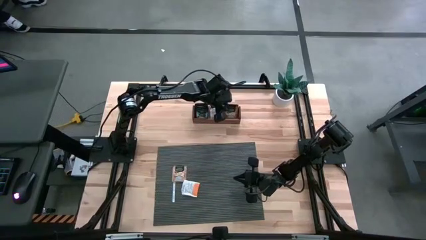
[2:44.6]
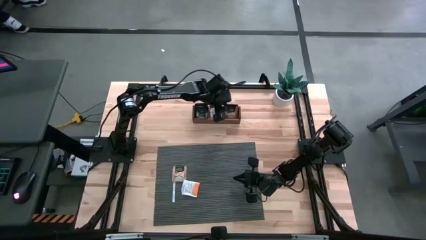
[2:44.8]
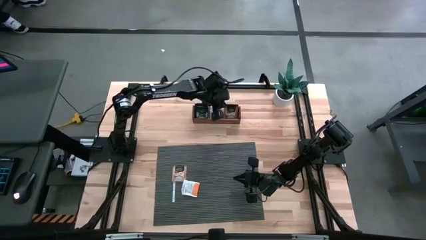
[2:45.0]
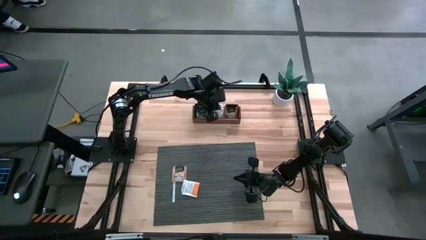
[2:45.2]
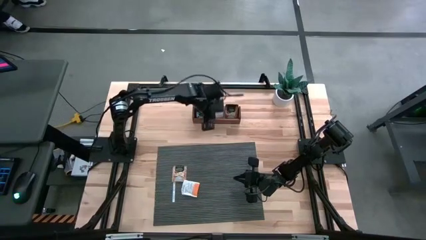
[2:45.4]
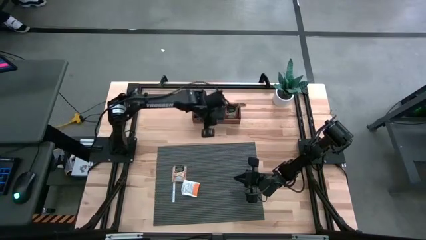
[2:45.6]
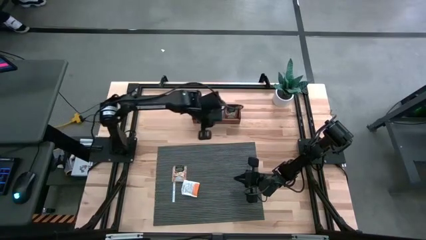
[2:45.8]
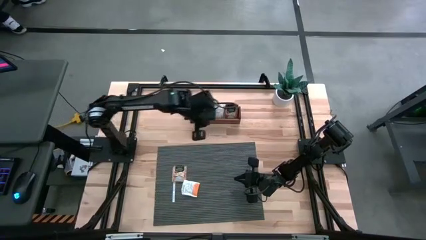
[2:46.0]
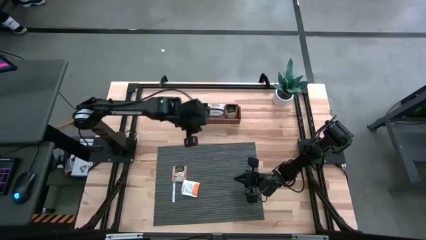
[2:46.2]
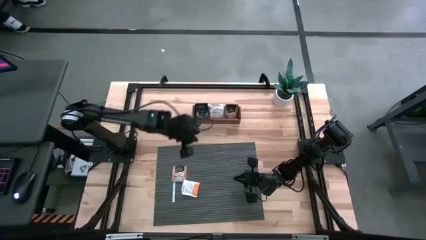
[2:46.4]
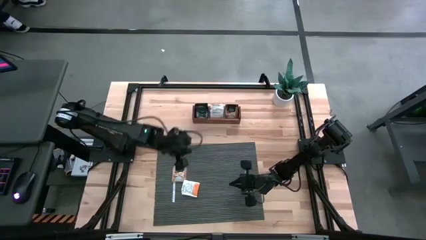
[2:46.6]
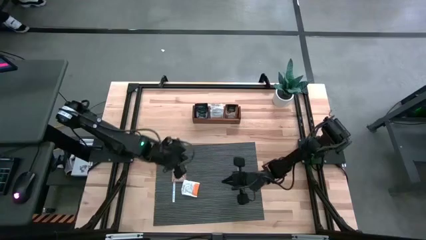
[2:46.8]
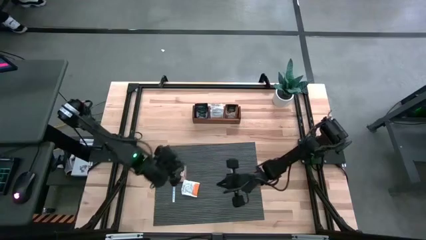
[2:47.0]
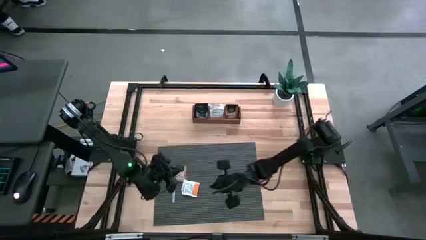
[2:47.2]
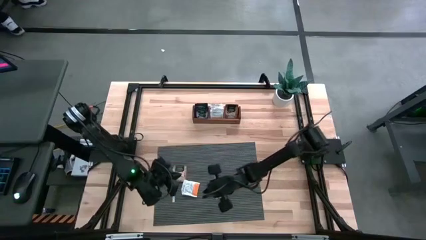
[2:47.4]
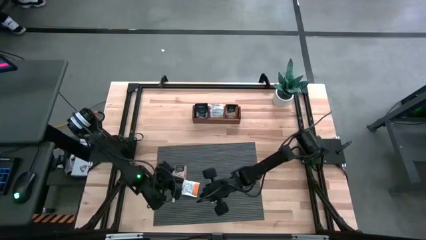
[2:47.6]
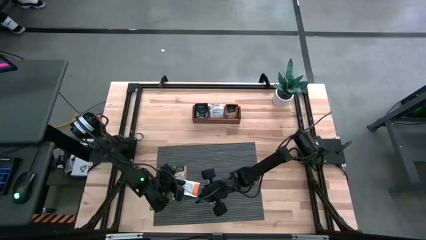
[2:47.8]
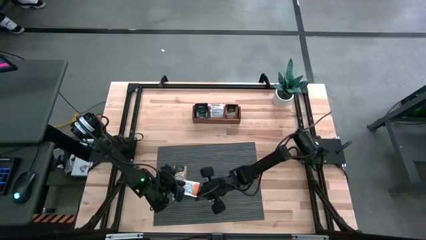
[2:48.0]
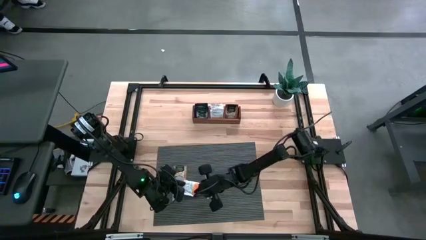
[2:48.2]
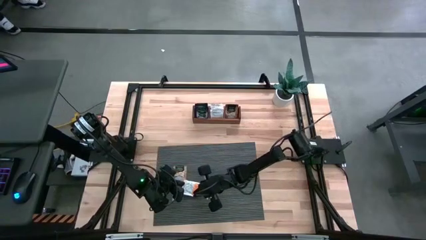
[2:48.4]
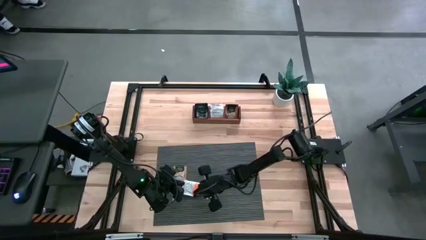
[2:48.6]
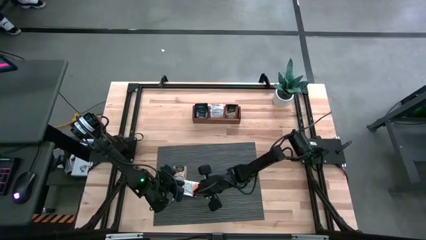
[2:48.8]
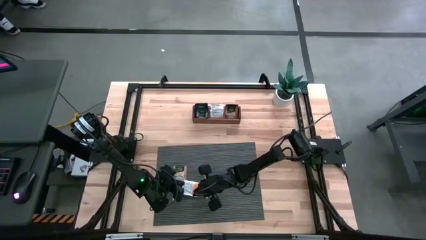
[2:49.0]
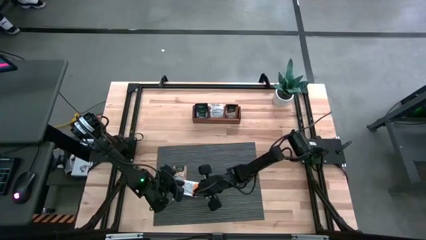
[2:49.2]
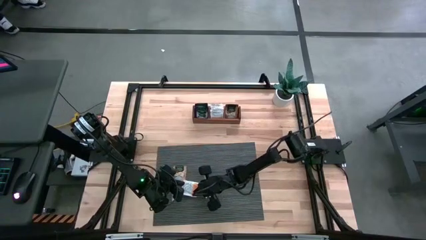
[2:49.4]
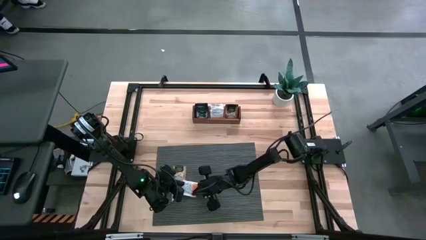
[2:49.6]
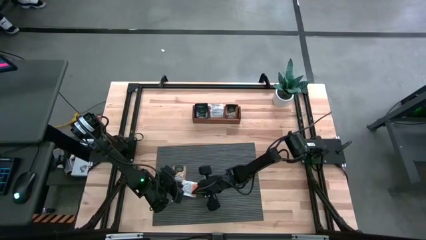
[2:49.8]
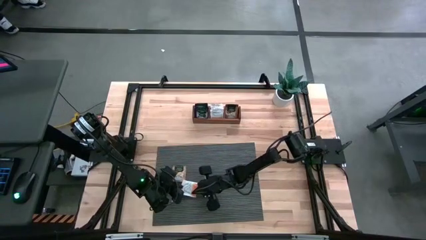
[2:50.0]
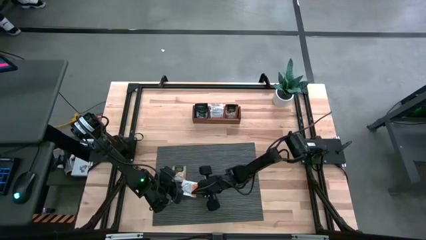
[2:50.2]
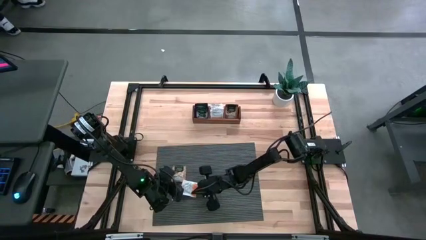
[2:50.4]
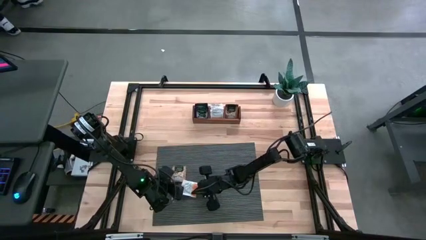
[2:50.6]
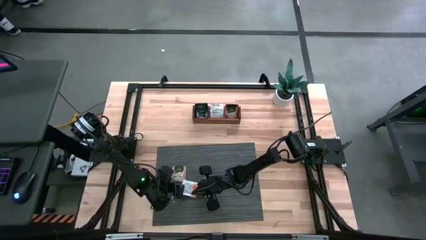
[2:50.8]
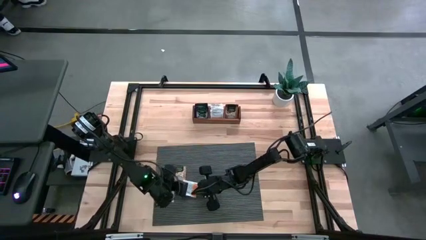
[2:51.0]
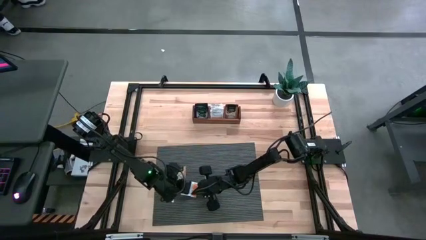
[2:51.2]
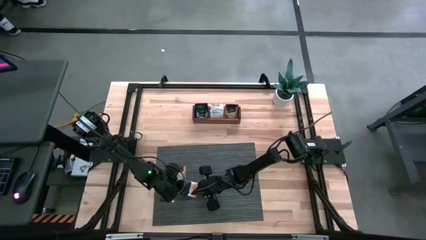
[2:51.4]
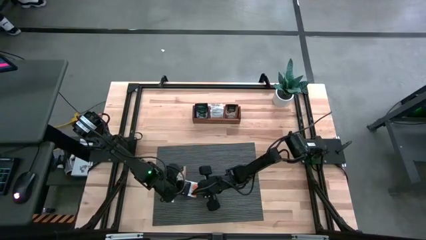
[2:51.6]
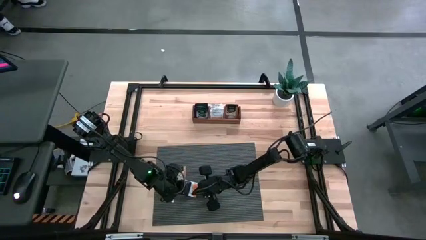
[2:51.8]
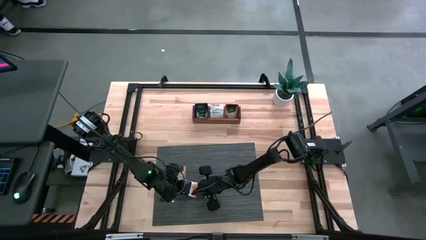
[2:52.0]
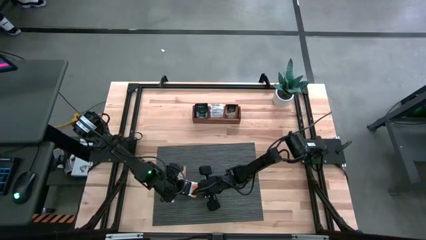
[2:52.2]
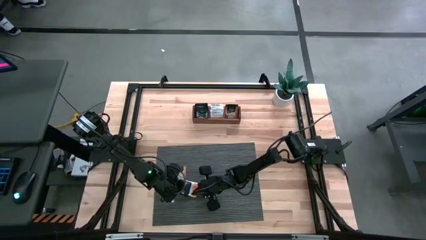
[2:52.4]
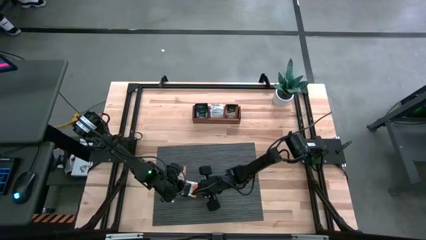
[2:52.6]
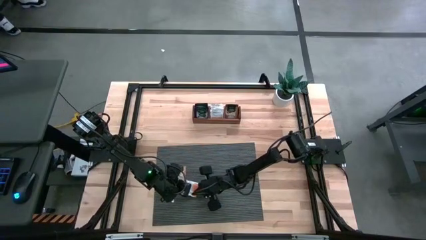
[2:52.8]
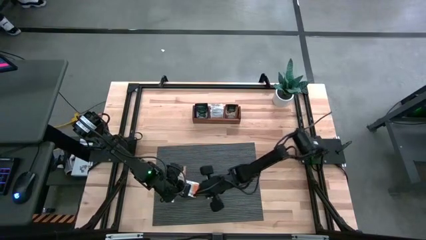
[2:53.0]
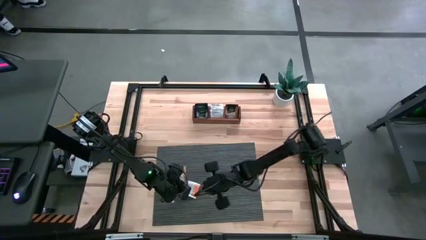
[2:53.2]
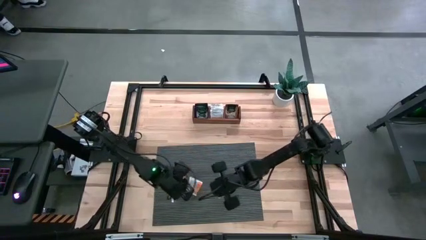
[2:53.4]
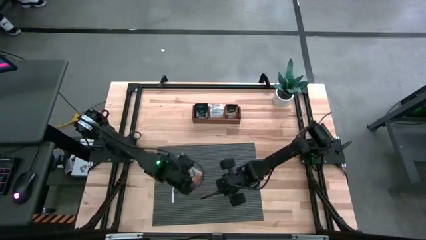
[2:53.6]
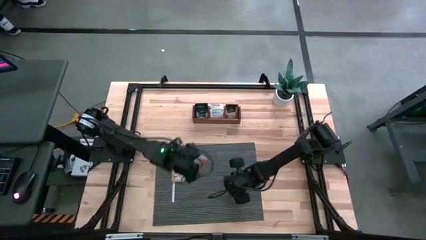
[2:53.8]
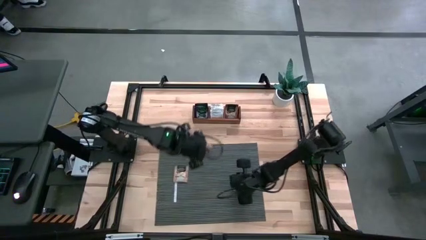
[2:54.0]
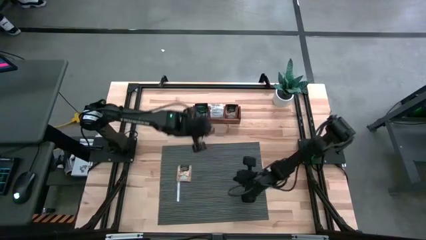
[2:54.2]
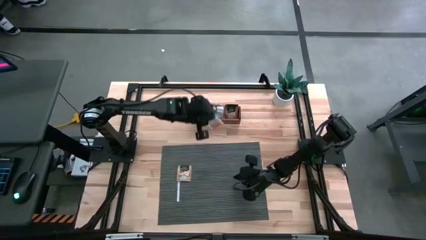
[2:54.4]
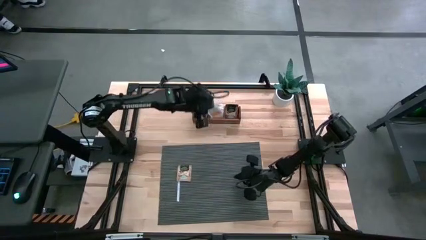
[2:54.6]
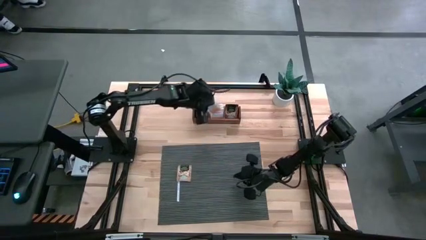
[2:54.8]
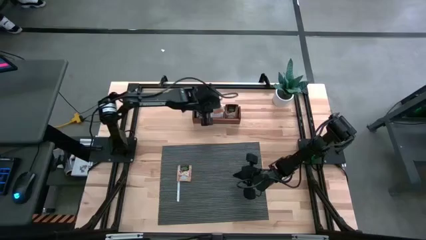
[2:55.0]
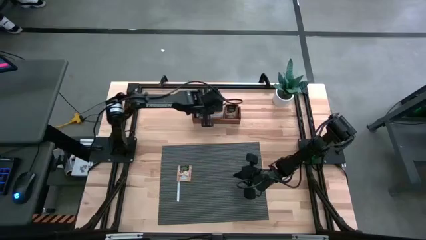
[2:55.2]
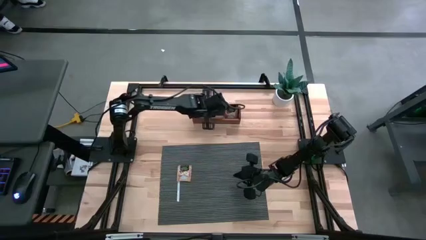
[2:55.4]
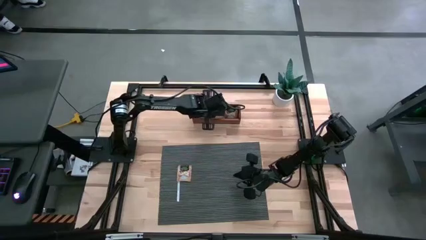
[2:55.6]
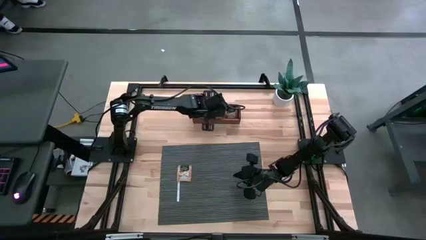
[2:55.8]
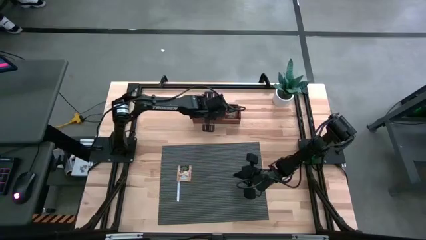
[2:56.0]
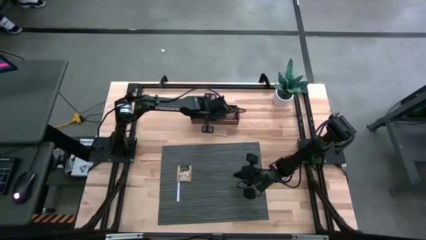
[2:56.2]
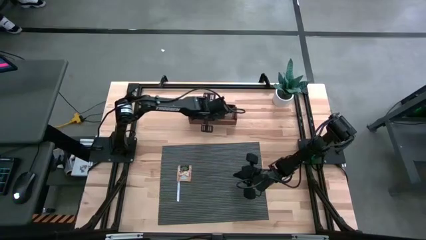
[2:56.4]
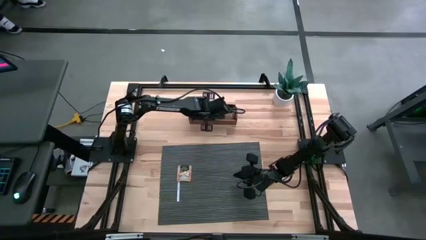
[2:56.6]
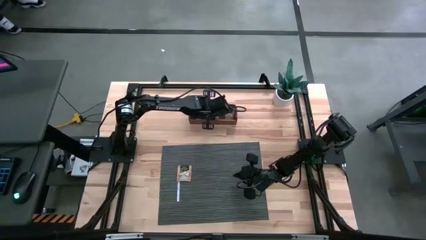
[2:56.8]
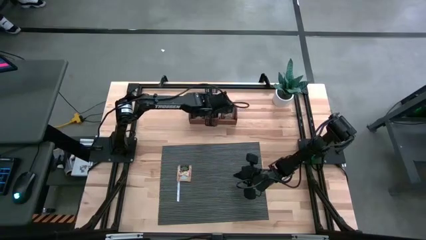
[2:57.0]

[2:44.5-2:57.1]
Task: Pick & Place Tea
Put the orange tea bag into the middle compartment of the wooden organizer

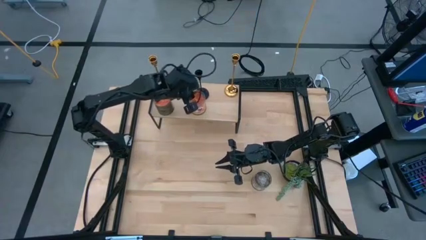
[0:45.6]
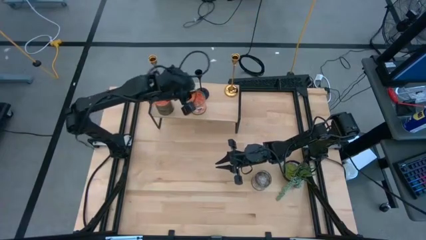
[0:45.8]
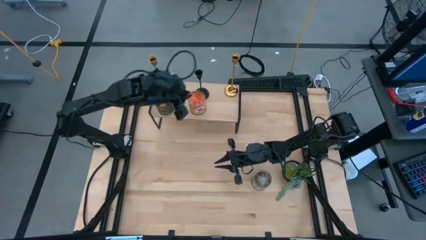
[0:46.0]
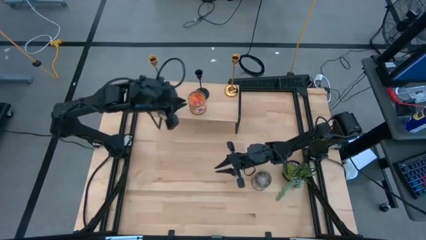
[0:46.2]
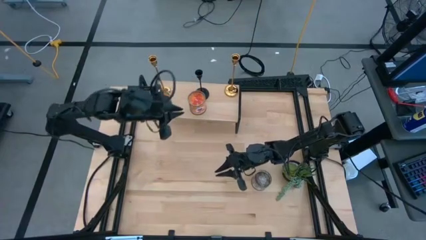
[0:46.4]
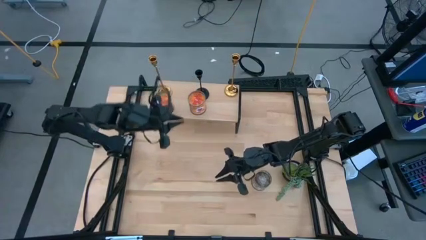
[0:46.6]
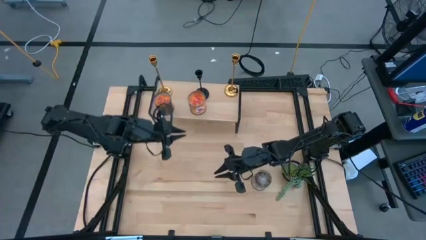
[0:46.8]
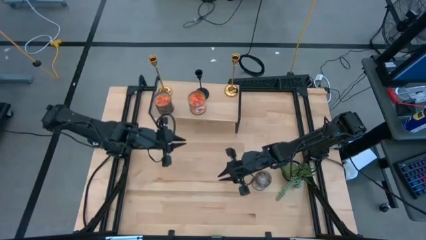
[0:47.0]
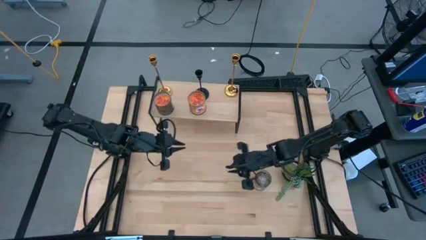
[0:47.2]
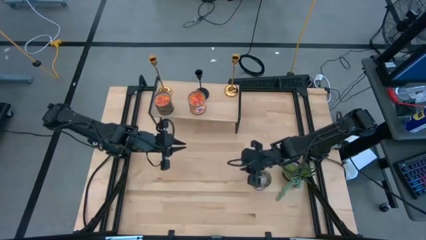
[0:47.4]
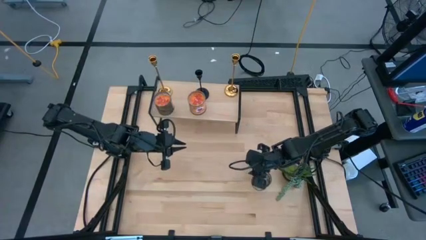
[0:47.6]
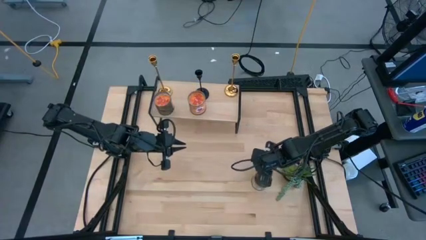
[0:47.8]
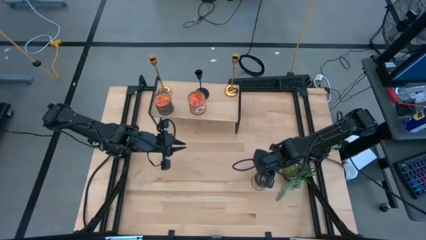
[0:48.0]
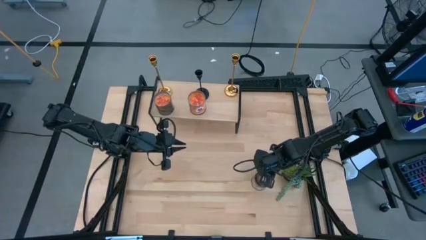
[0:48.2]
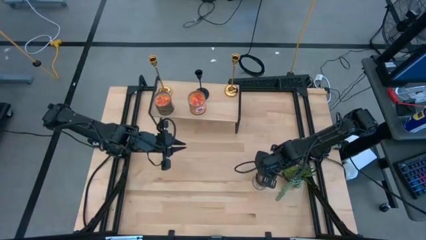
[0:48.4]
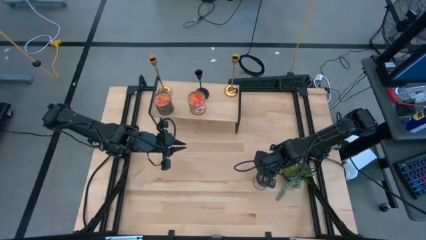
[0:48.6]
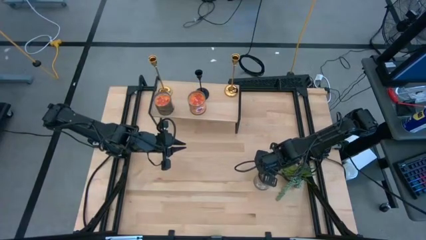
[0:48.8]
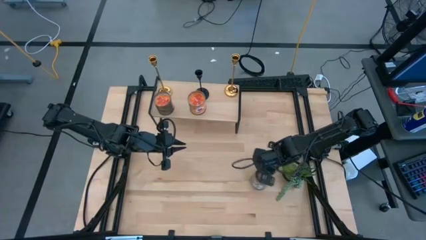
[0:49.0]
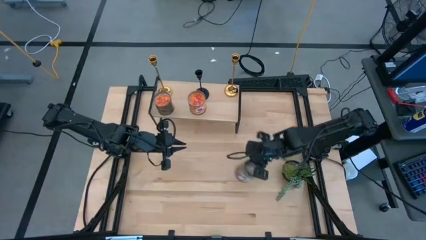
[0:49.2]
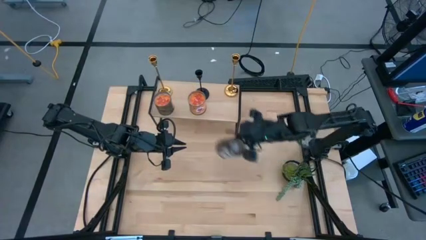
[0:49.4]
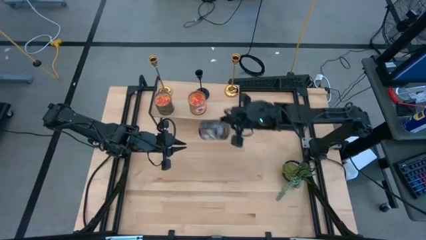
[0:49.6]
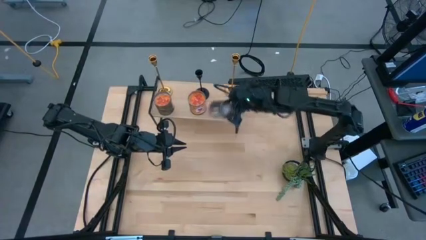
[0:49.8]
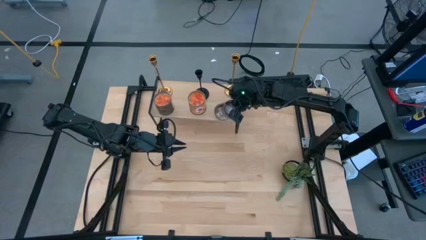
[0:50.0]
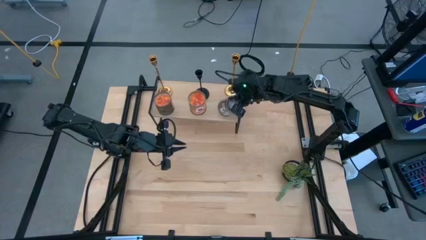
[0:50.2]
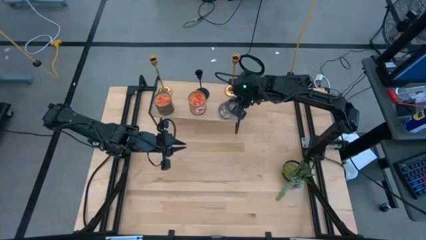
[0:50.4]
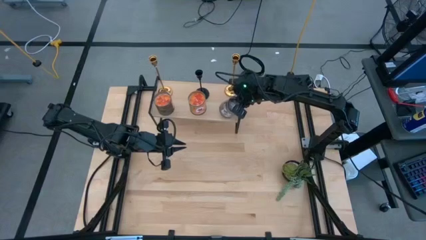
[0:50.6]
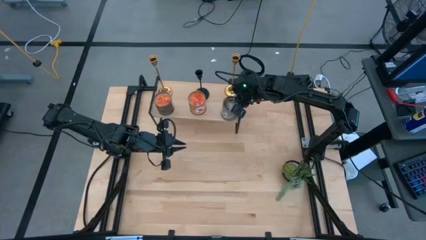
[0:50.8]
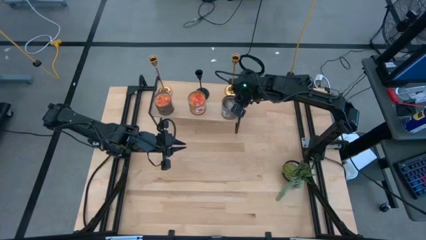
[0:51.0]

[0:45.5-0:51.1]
Task: Pick & Place candle stick holders
Put the brown scented candle on the shelf aligned with the right golden candle holder
